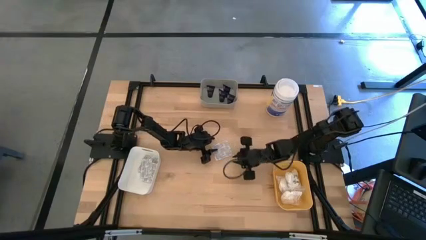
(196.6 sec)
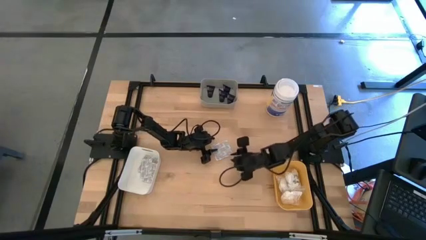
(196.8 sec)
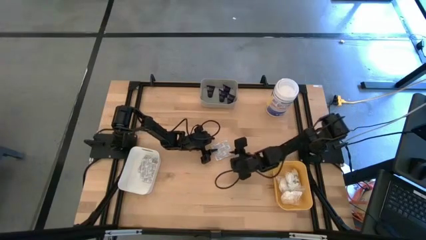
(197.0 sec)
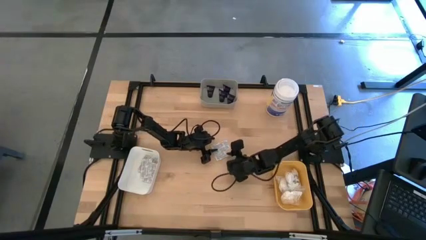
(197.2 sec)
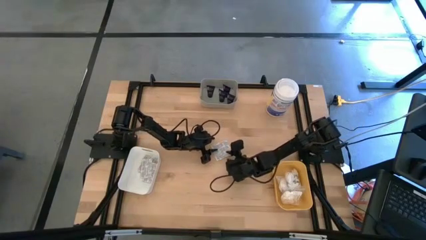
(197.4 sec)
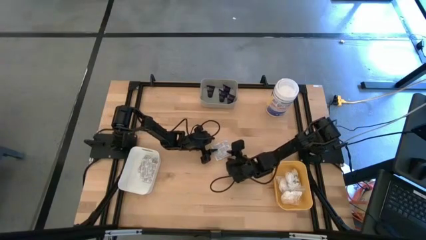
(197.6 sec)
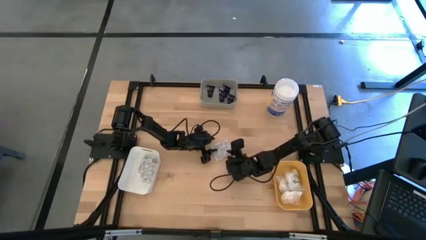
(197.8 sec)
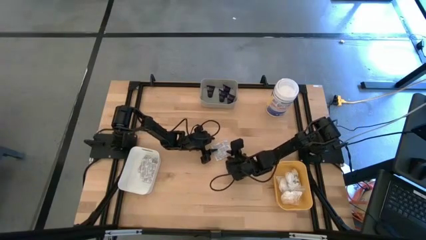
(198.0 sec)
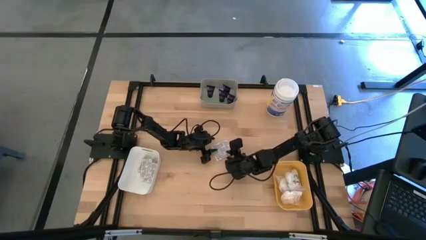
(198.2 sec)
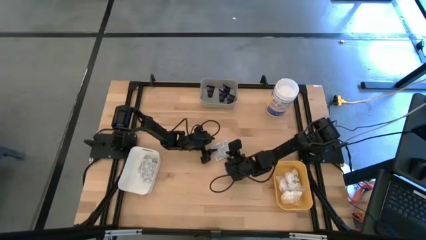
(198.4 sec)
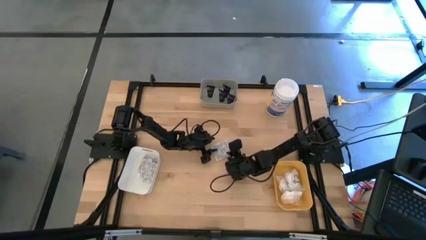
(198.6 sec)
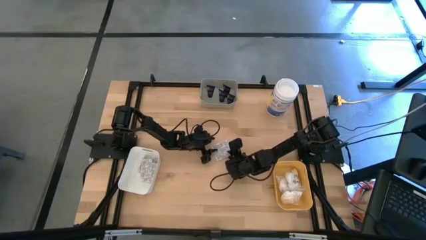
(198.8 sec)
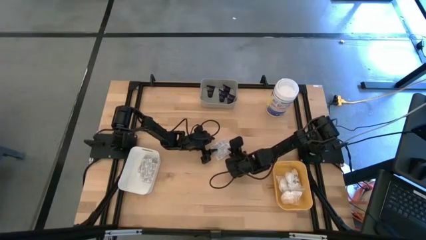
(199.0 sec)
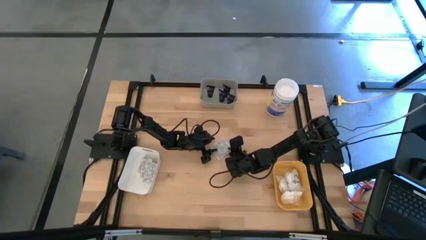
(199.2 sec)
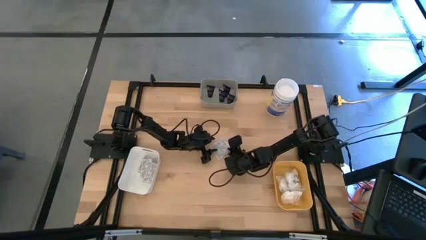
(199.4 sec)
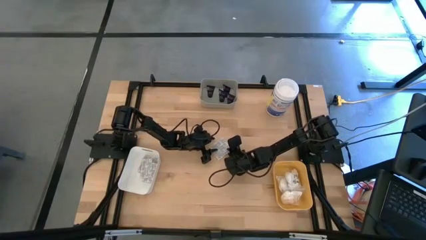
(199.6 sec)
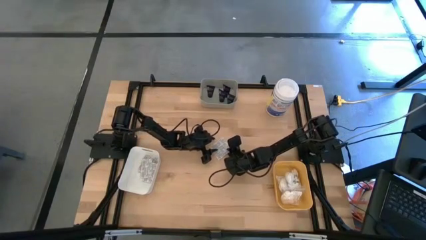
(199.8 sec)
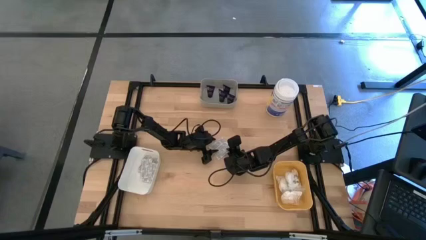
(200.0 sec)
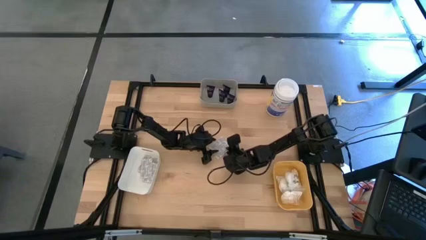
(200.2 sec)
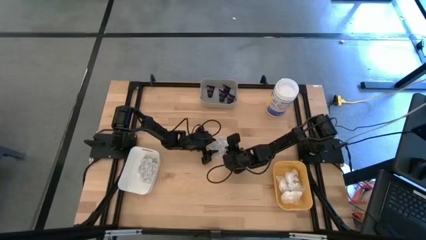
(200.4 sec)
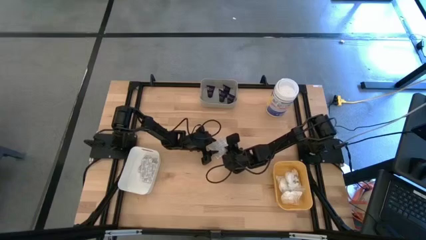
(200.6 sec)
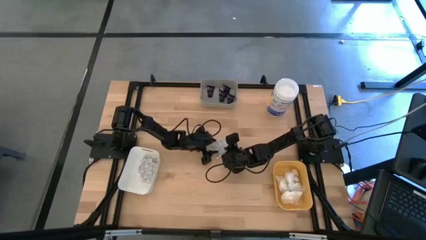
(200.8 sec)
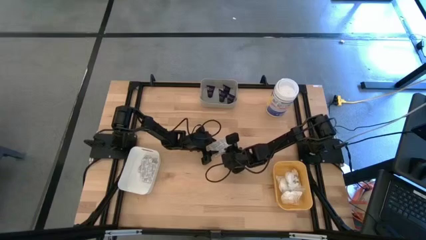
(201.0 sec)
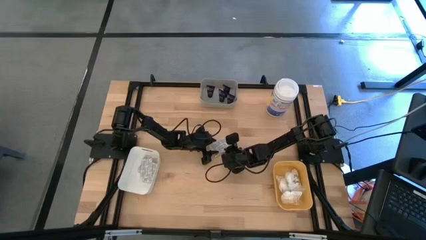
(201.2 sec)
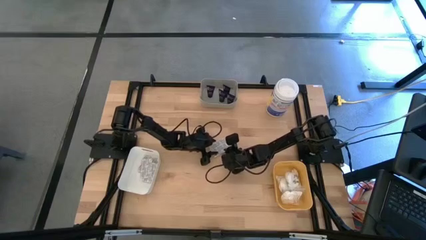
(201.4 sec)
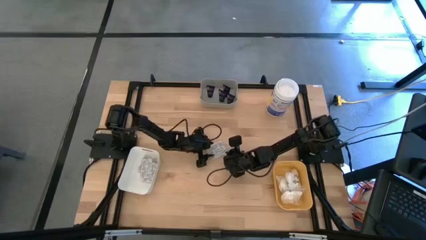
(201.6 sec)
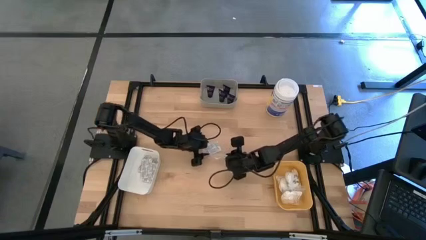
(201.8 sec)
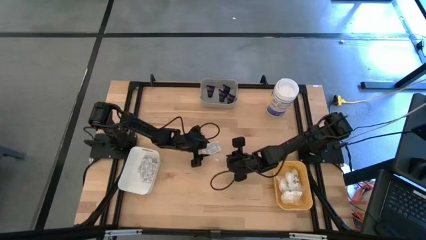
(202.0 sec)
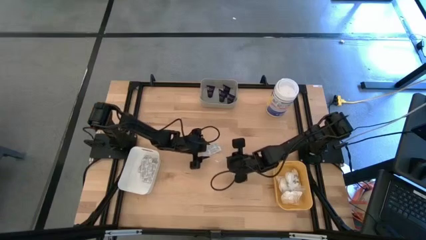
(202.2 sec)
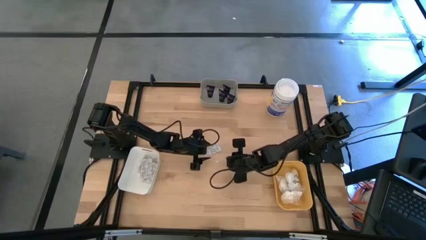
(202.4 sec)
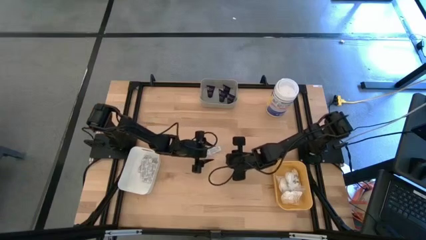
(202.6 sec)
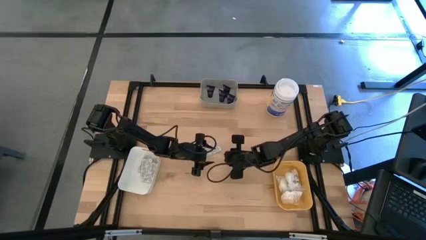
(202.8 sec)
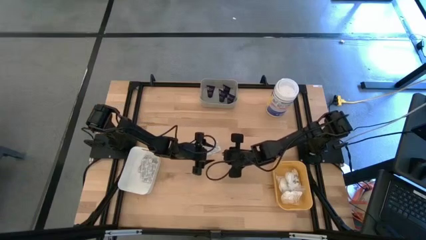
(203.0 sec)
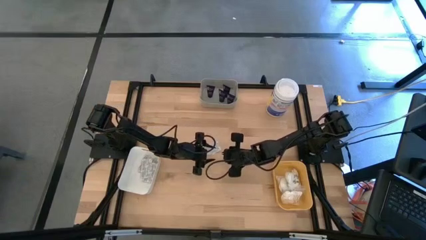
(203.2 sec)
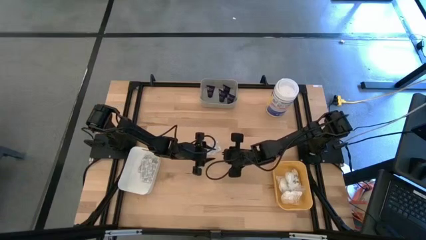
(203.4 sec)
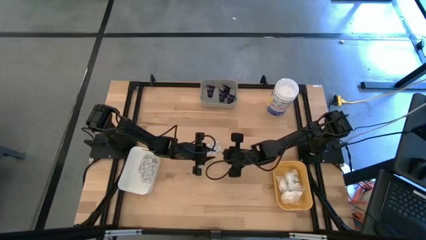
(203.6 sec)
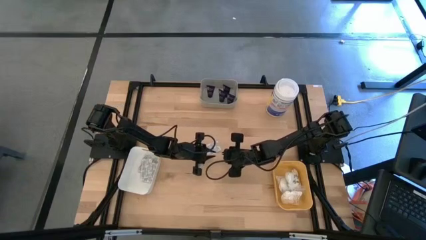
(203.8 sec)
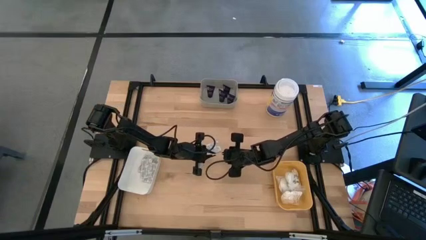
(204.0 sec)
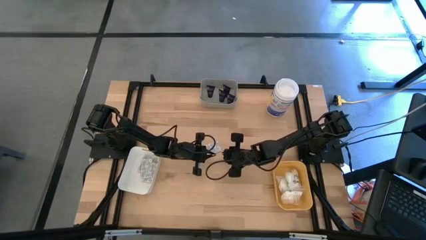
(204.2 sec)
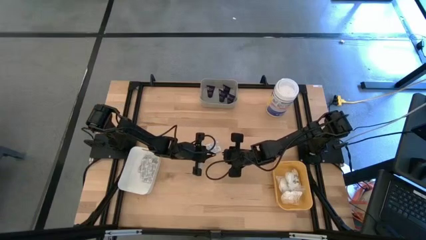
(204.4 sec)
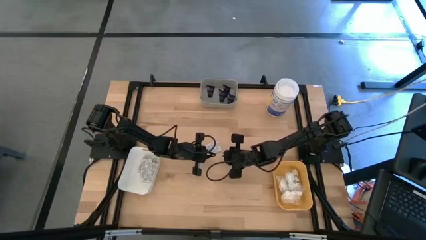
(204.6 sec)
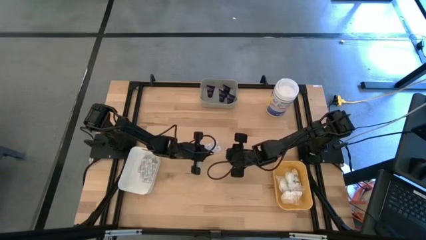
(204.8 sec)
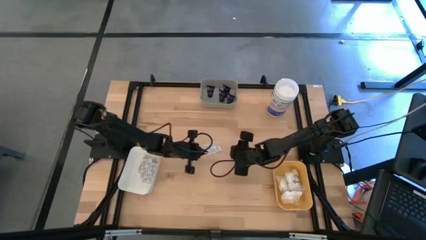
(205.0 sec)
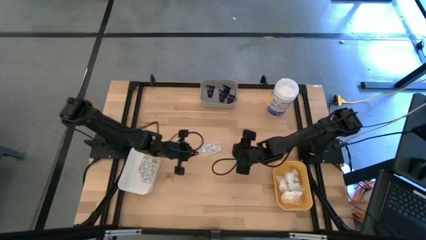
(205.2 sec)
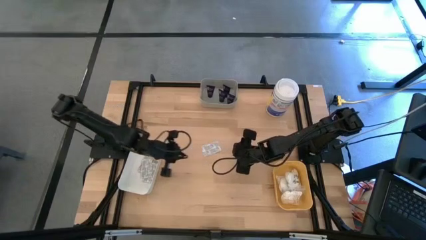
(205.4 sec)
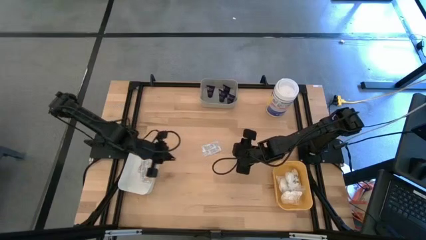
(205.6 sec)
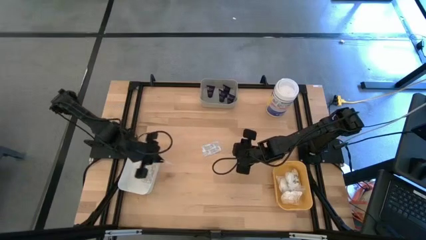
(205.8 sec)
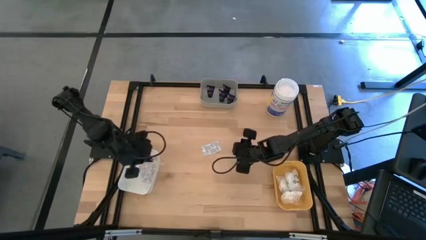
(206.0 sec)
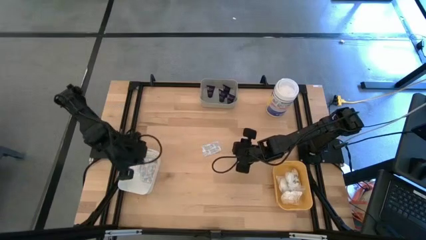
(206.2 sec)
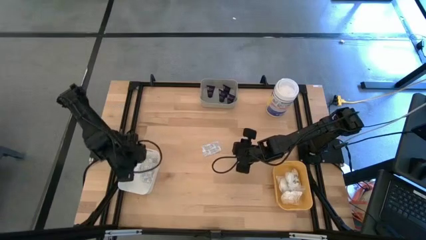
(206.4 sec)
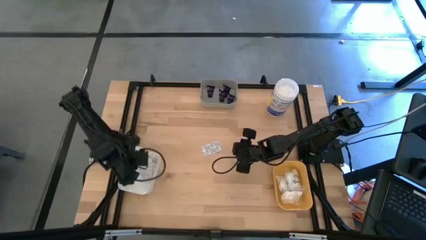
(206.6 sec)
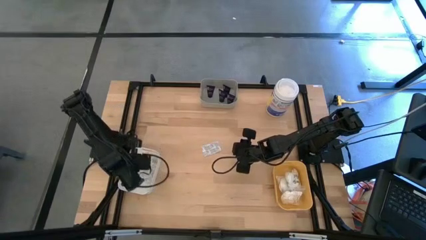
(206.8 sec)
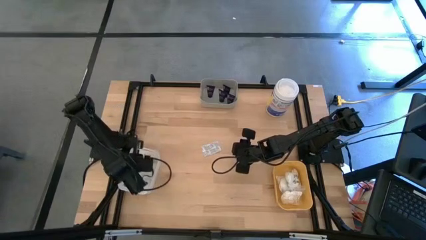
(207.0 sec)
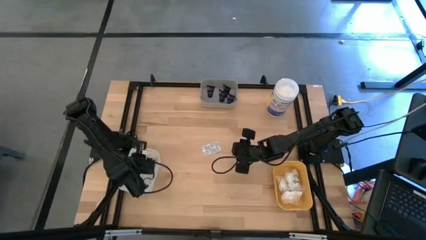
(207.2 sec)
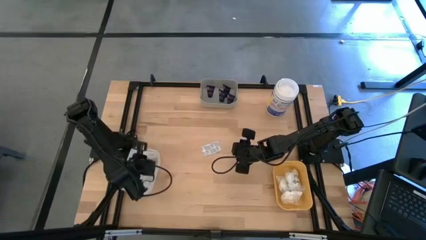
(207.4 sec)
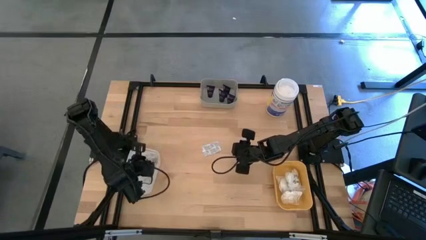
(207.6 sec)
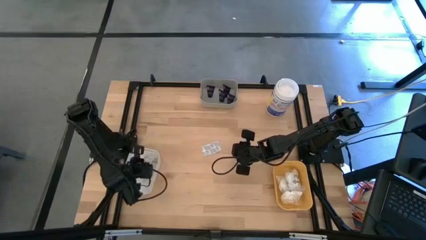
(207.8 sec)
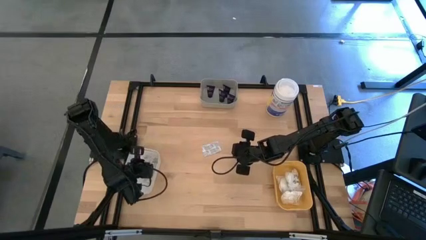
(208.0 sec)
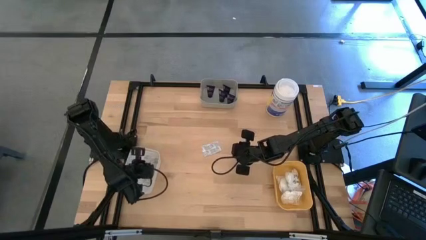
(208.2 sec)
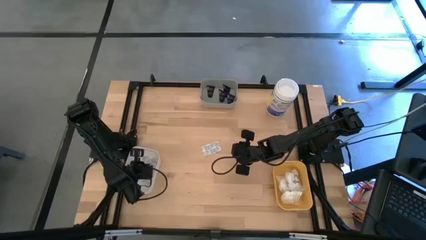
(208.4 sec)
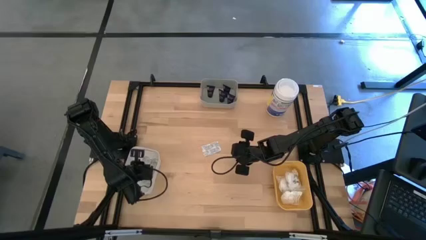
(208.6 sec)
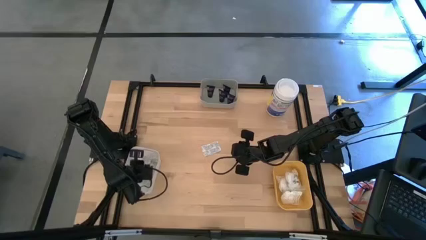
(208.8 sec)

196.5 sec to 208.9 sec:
Task: Pick & Place Travel size toiletries
Put the bandage into the white bin

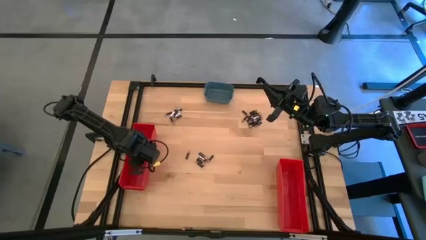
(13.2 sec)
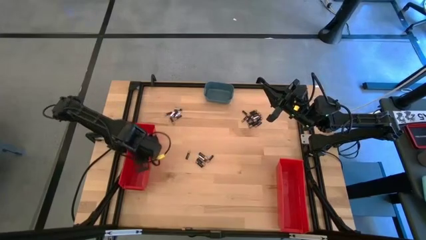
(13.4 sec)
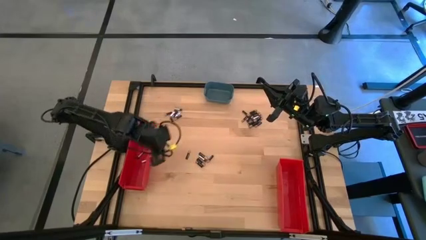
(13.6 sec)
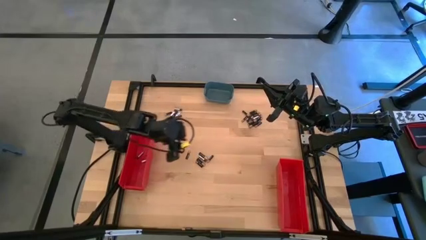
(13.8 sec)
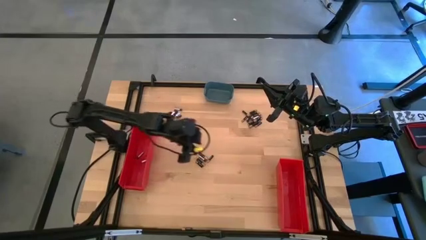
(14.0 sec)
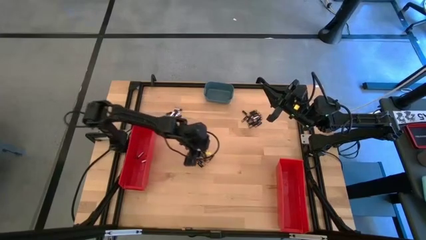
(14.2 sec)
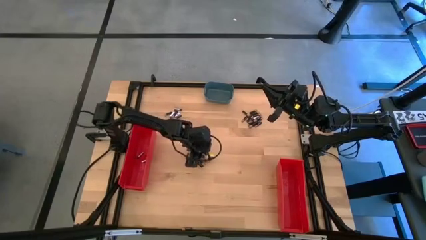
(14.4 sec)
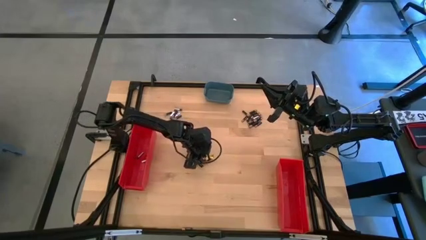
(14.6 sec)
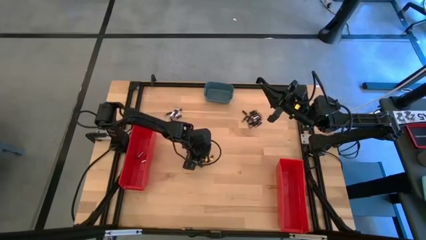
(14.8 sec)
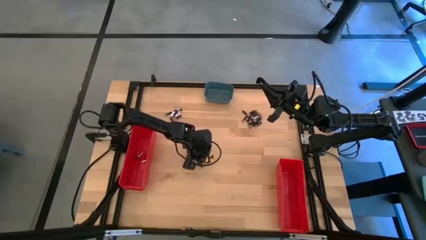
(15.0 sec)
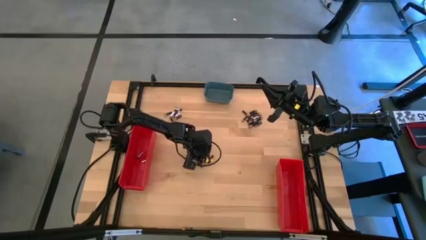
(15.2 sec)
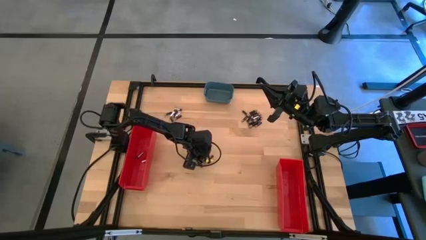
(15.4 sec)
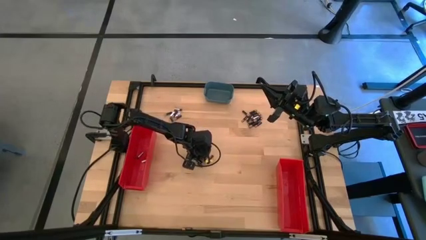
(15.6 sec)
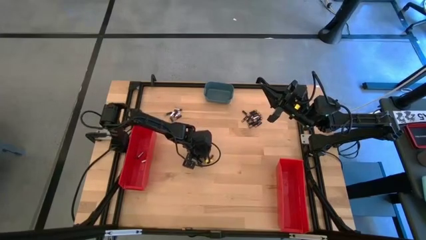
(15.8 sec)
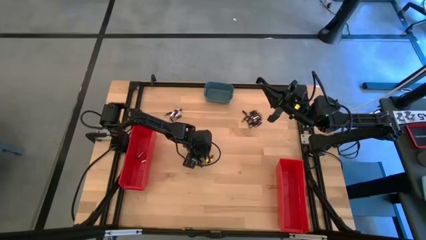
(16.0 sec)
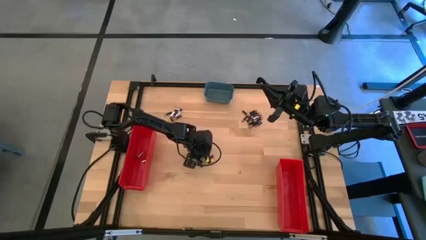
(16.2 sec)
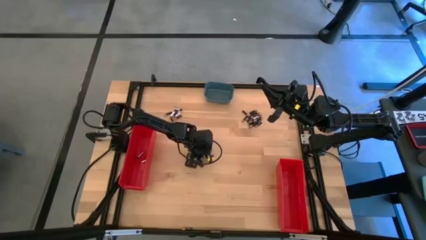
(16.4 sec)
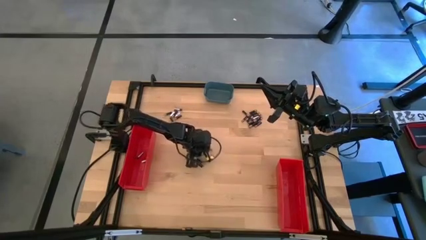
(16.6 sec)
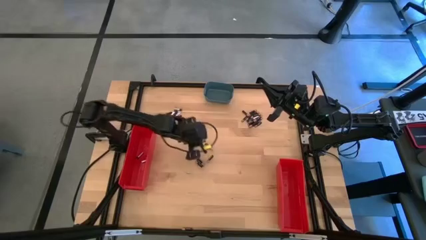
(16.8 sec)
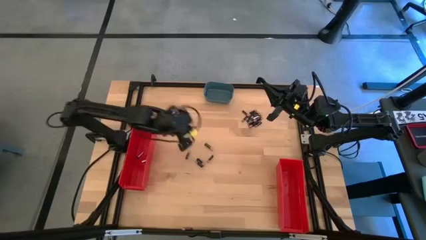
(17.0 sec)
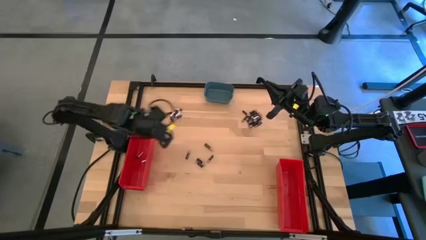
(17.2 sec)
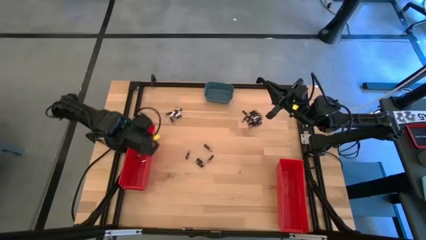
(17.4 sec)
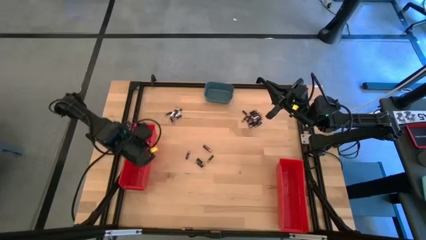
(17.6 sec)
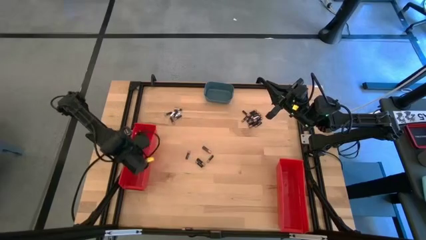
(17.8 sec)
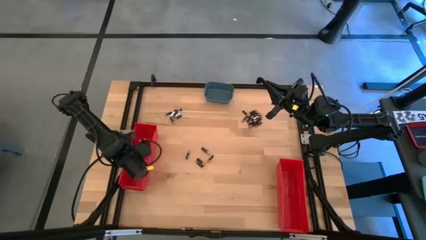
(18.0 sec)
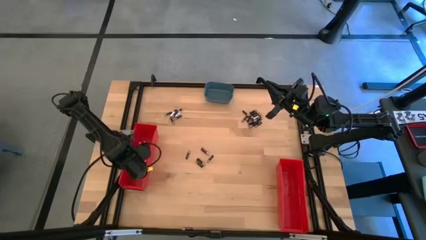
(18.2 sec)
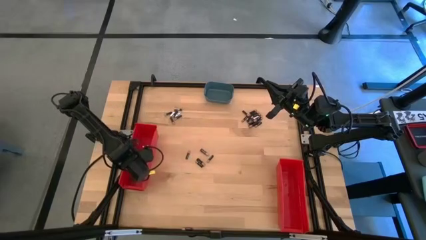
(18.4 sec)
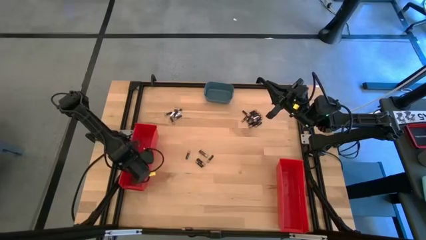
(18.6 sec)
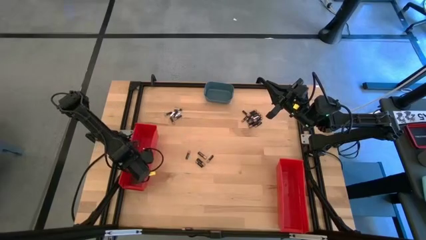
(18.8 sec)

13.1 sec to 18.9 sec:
Task: Sort batteries
Put the silver battery into the left red bin
